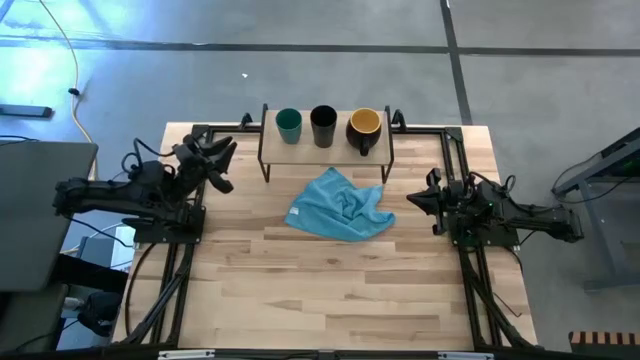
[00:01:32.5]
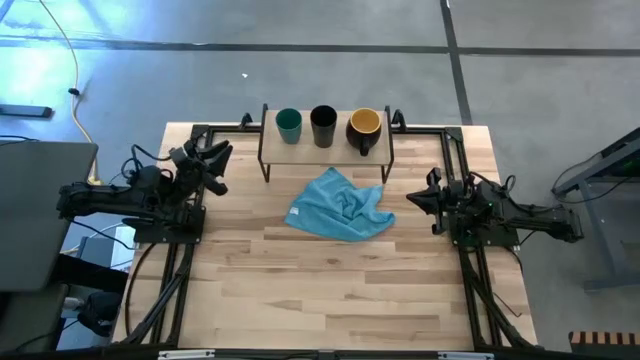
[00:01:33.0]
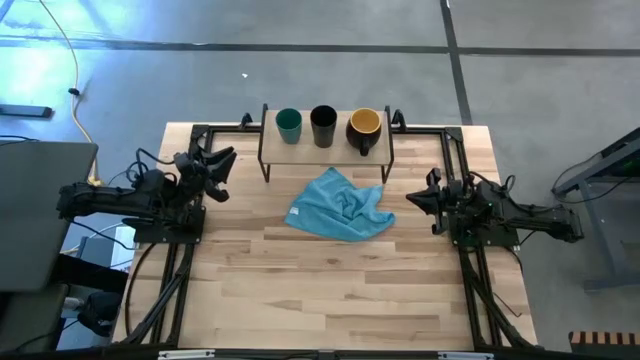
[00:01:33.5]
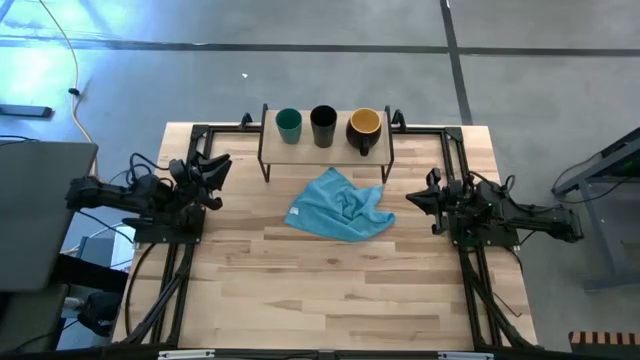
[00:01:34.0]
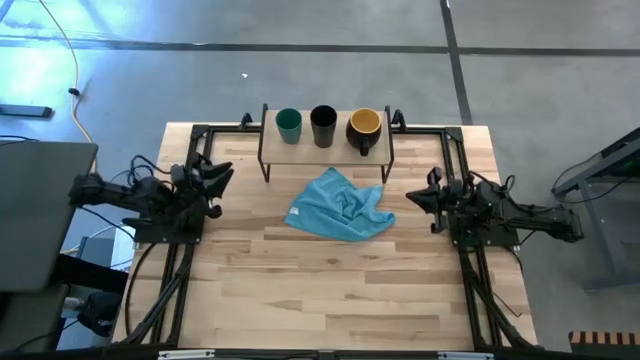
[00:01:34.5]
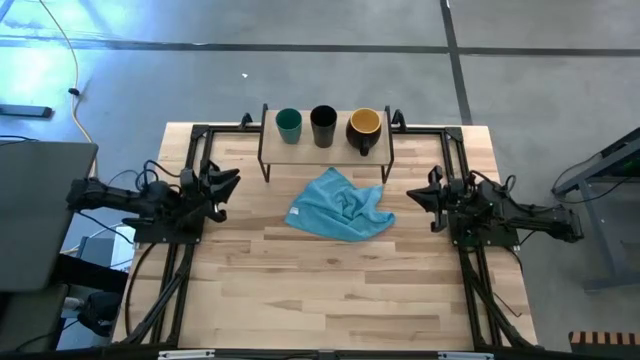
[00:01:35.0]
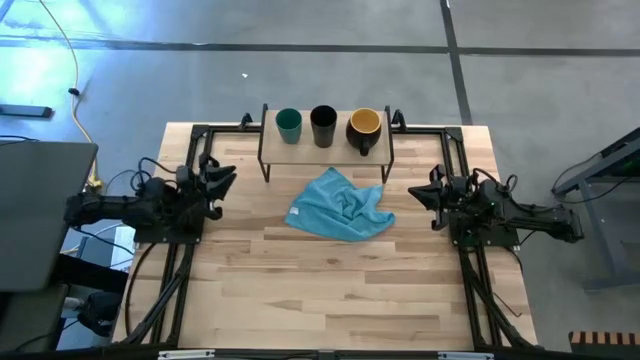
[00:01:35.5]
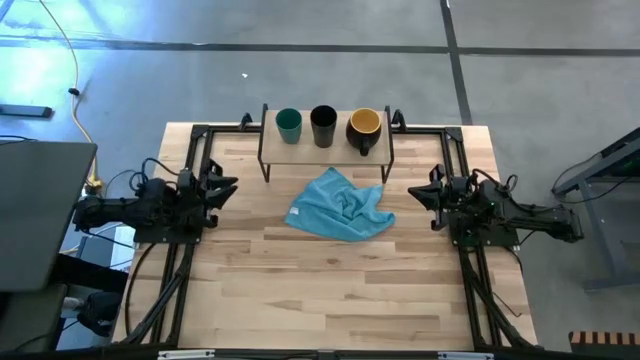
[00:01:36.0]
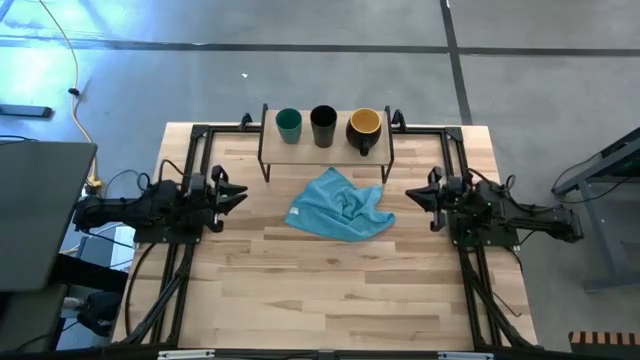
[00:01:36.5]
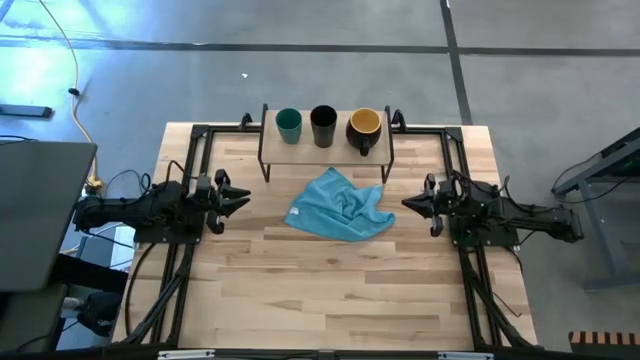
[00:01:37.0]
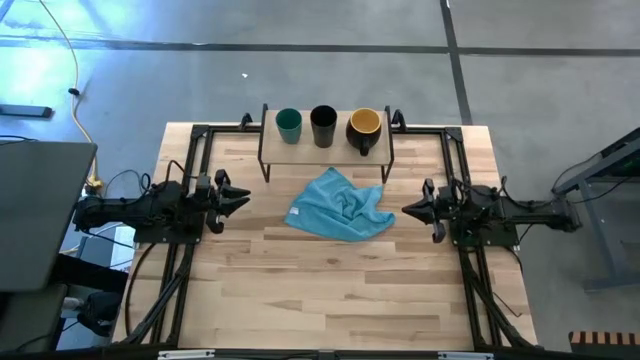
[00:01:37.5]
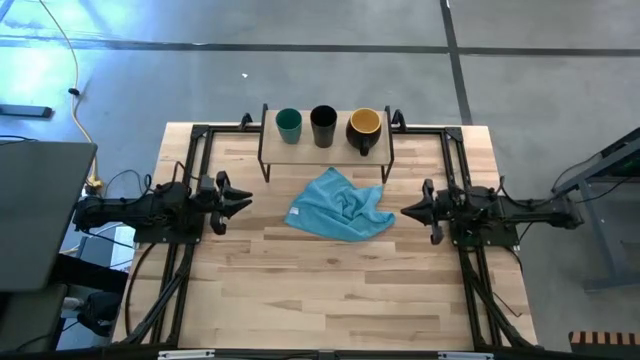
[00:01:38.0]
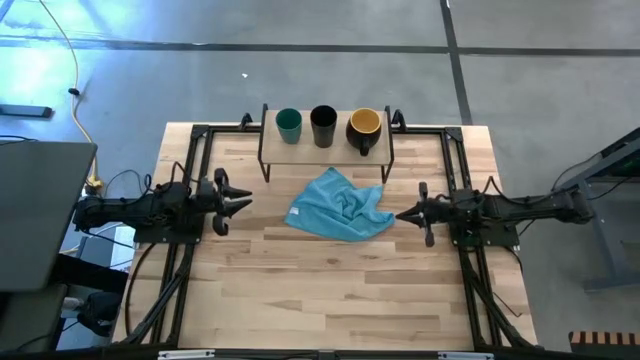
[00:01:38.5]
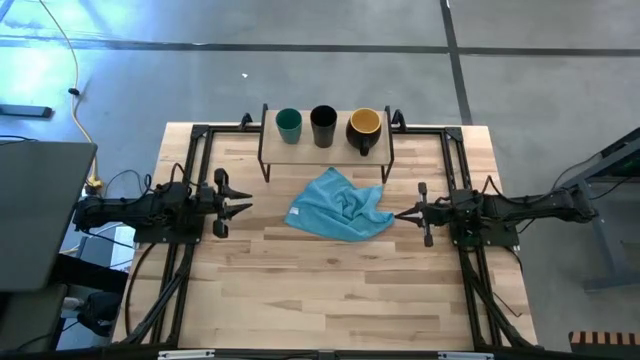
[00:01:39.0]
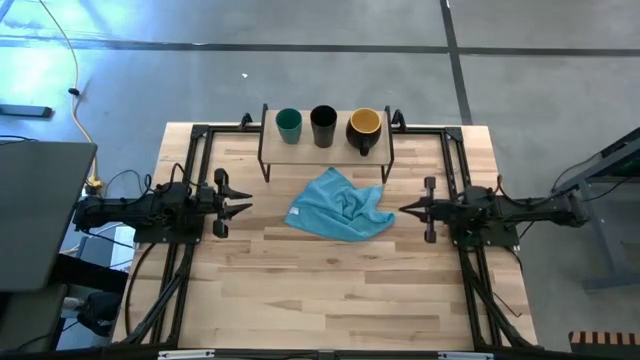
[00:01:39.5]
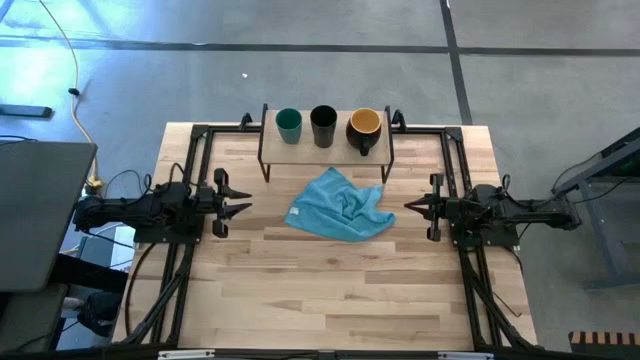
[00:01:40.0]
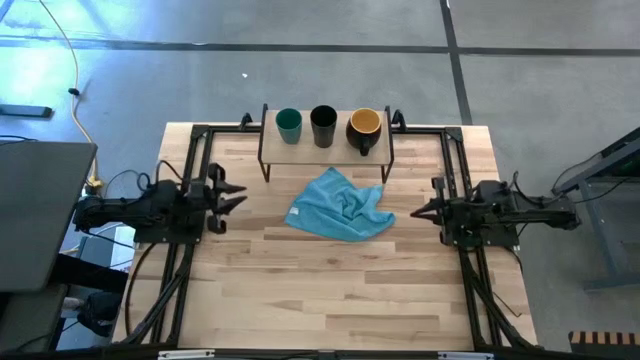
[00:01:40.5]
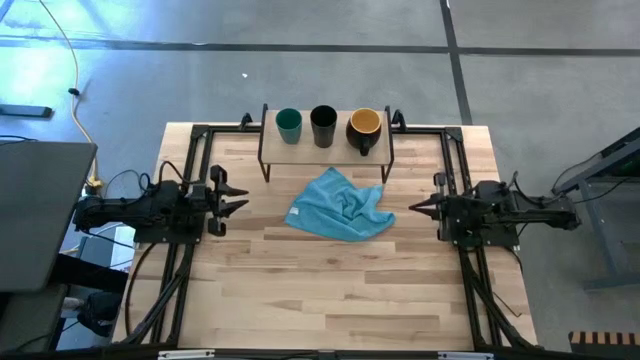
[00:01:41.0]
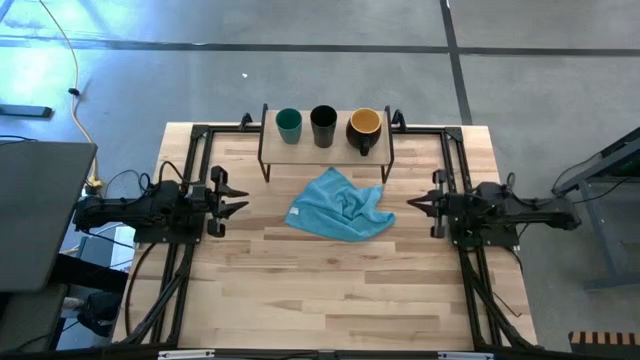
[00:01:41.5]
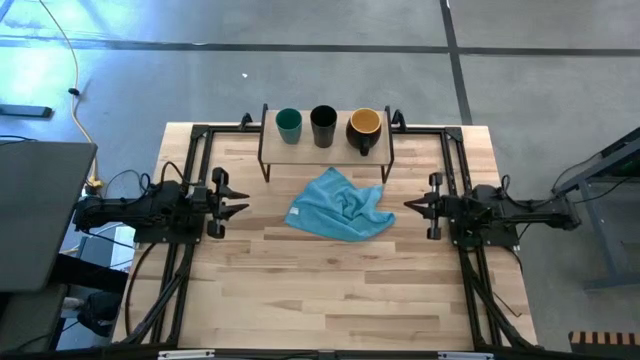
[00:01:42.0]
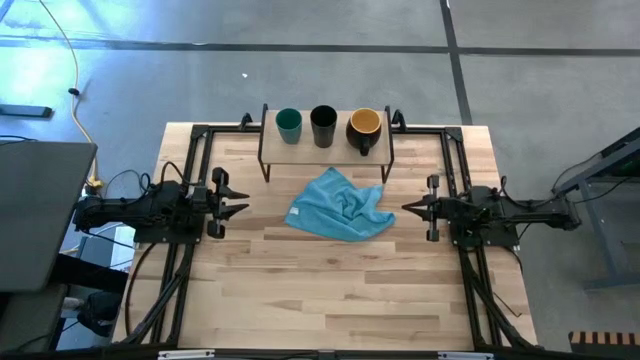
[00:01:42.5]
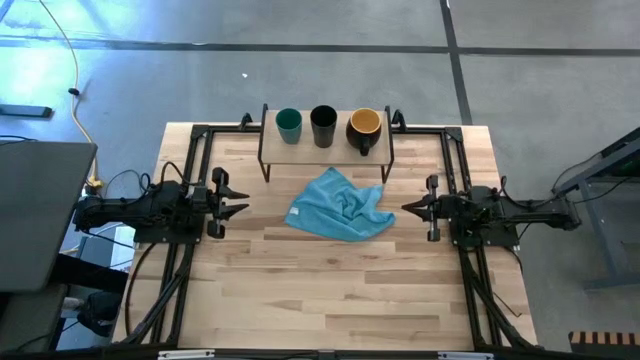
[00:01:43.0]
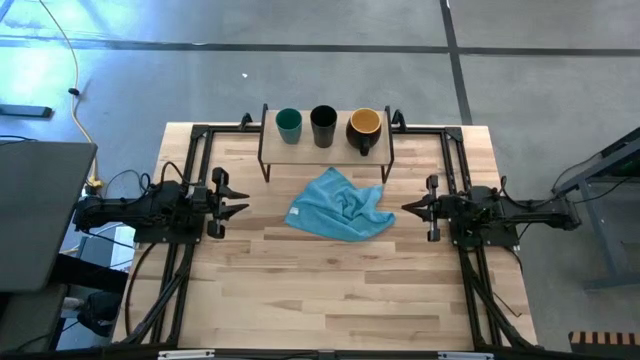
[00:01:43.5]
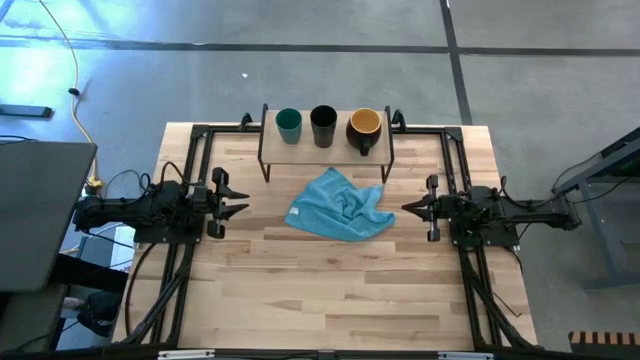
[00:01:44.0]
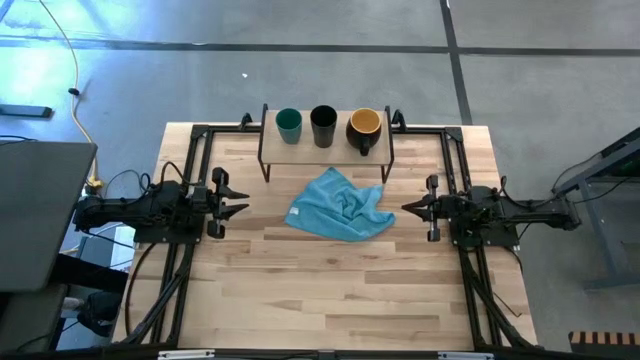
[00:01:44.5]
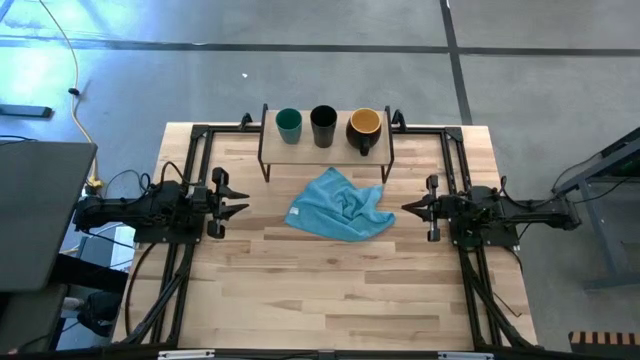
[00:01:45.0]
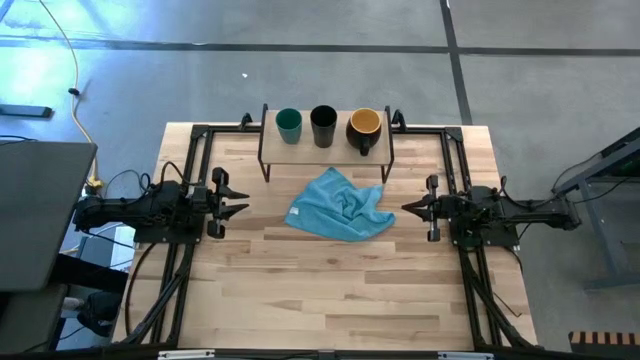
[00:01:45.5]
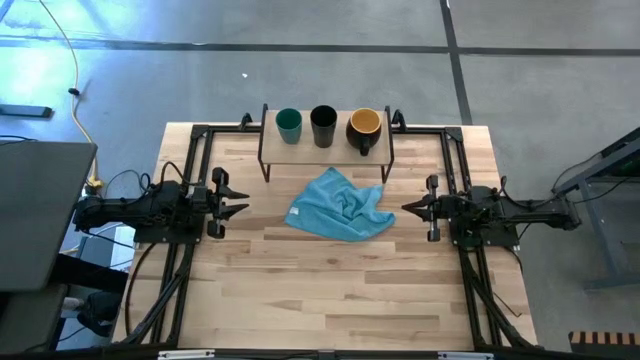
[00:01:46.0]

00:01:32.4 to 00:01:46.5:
Task: Stack small to large cups/mugs on shelf
Return to Home Position

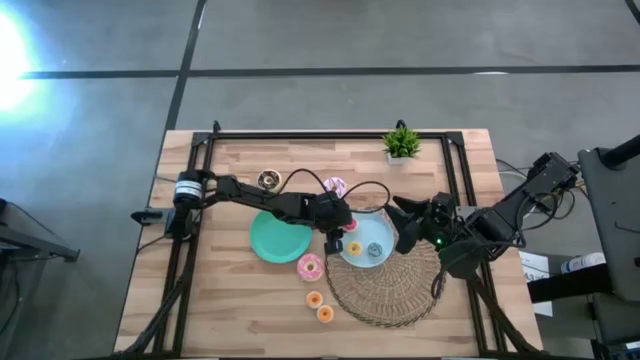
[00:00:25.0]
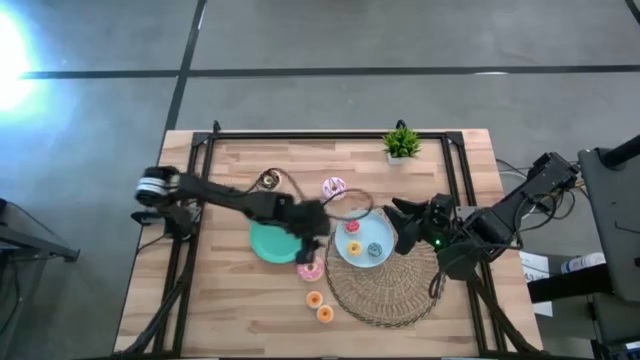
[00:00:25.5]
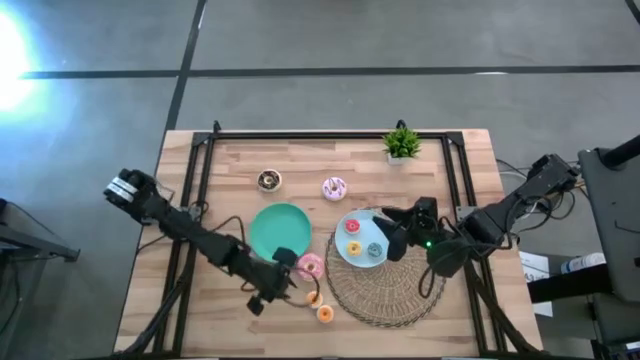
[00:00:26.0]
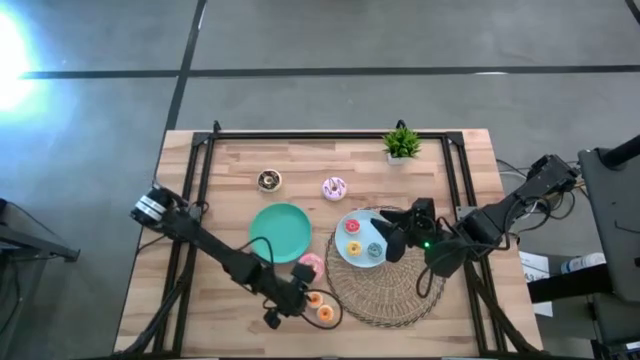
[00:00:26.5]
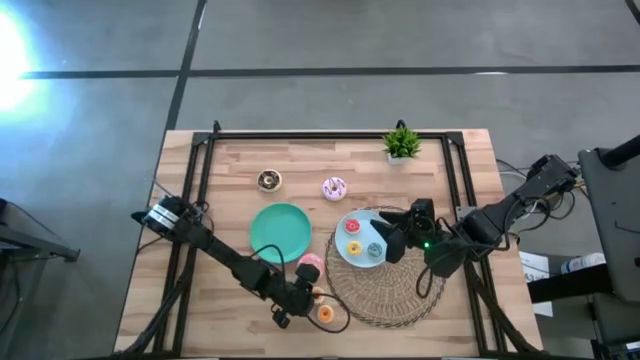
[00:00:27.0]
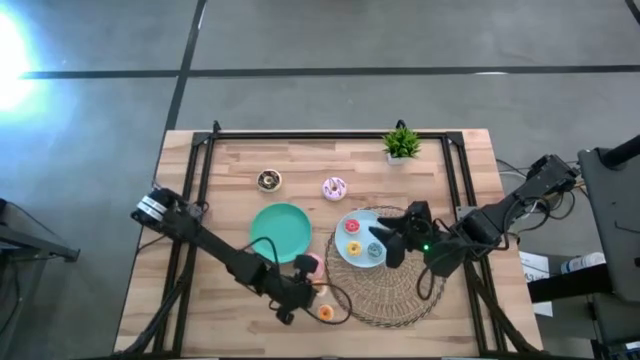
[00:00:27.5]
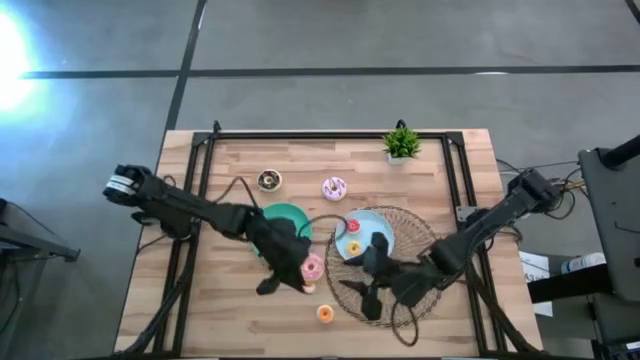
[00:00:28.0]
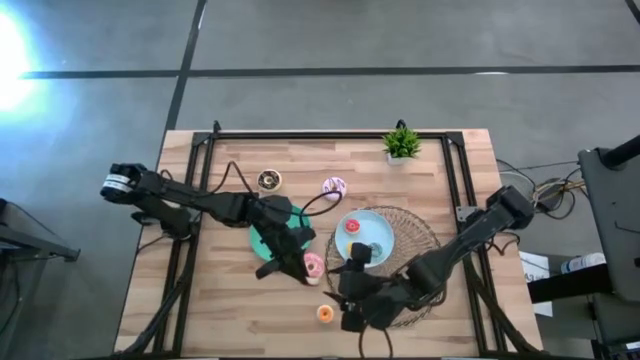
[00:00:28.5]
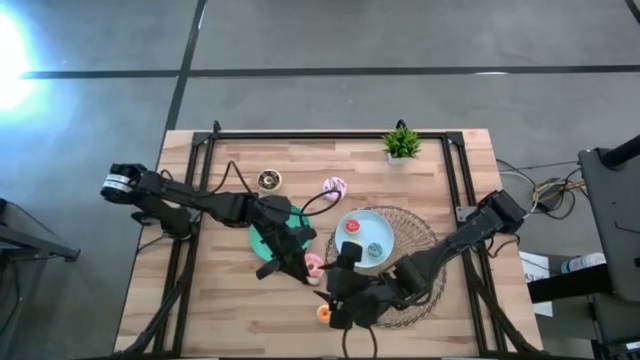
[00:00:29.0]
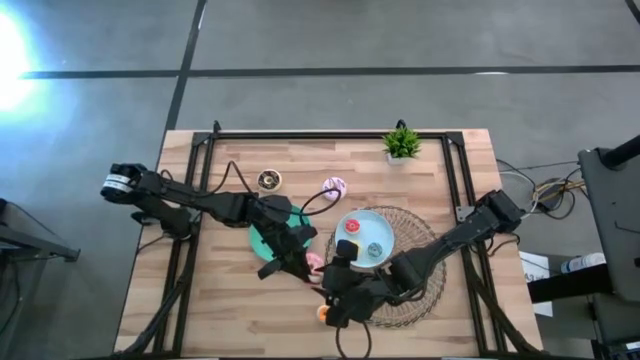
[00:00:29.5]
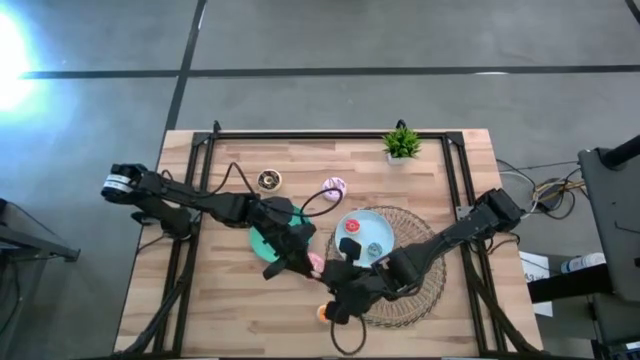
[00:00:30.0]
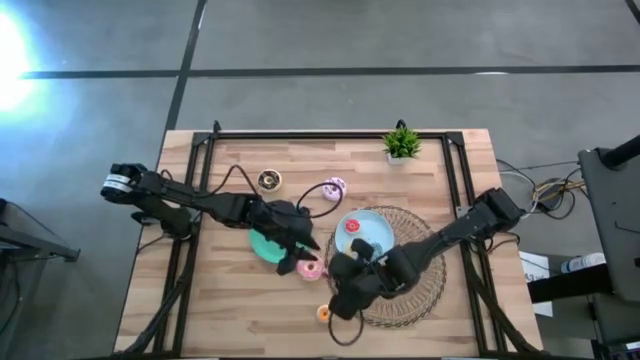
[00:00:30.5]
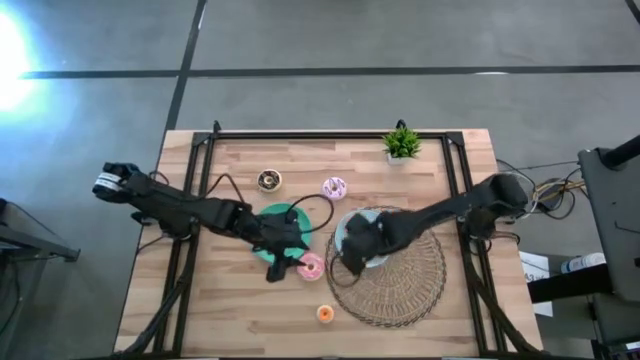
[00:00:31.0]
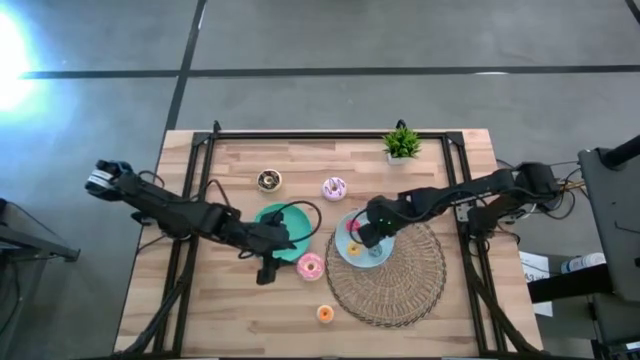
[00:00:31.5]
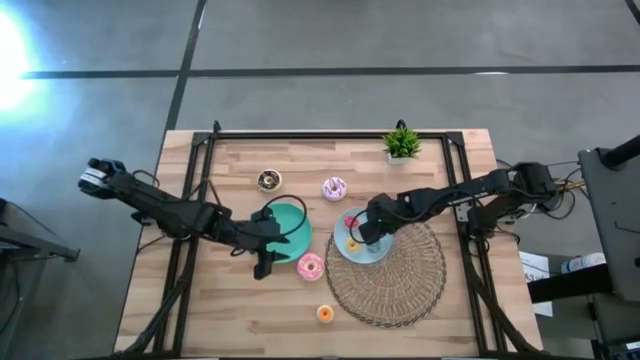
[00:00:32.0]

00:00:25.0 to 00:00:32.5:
Task: Pick & Place donuts
Put the small red donut on the blue plate
